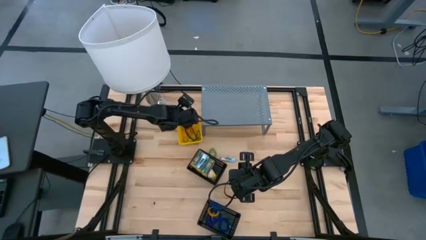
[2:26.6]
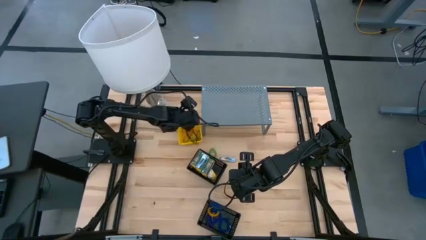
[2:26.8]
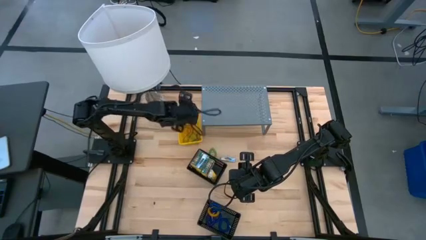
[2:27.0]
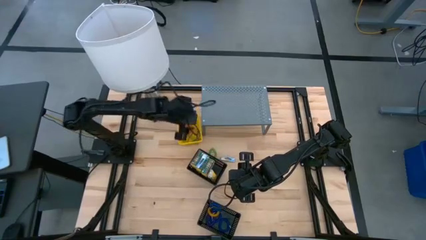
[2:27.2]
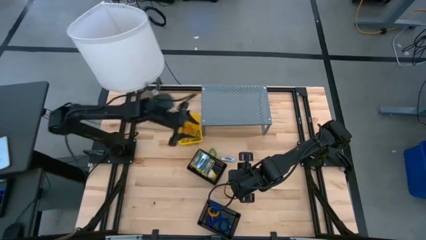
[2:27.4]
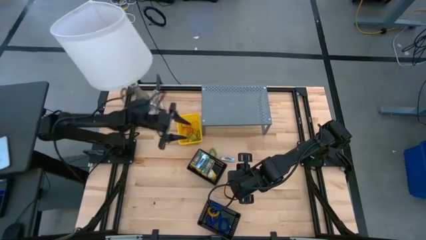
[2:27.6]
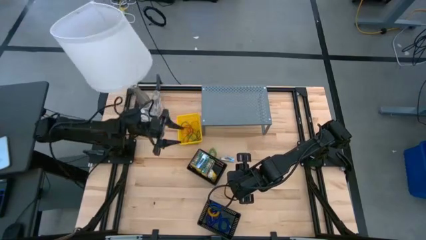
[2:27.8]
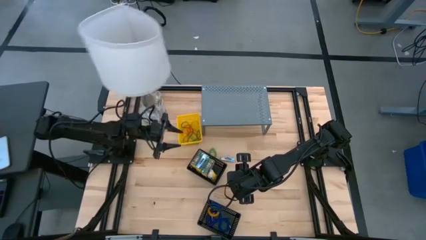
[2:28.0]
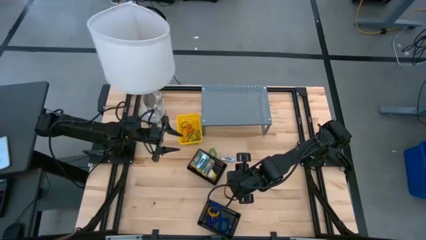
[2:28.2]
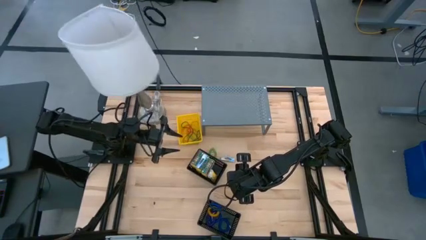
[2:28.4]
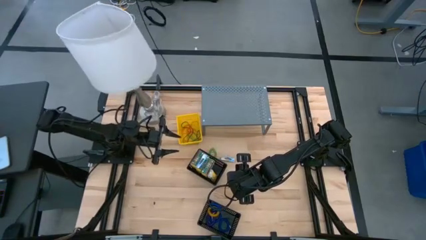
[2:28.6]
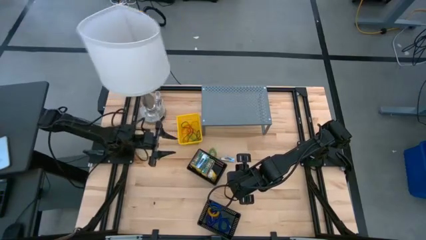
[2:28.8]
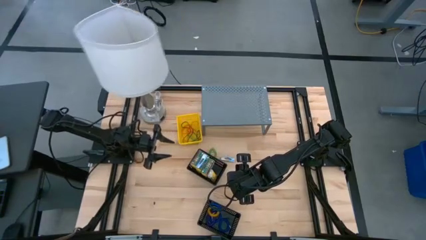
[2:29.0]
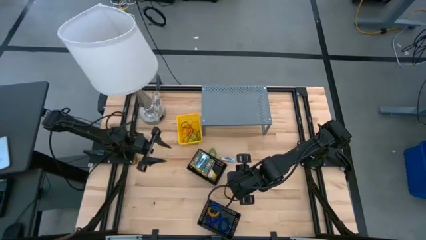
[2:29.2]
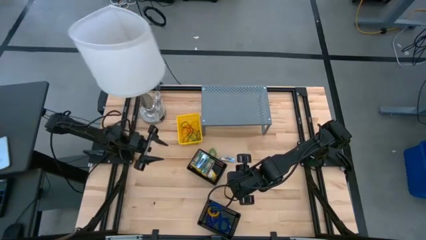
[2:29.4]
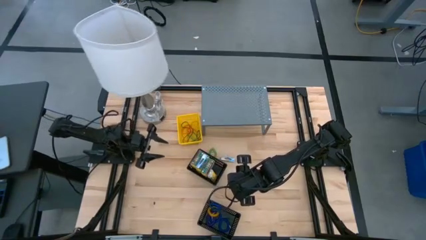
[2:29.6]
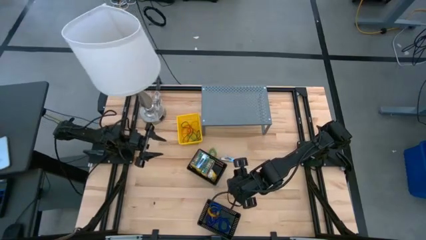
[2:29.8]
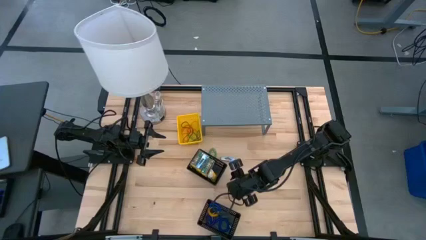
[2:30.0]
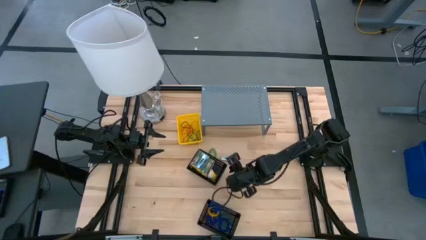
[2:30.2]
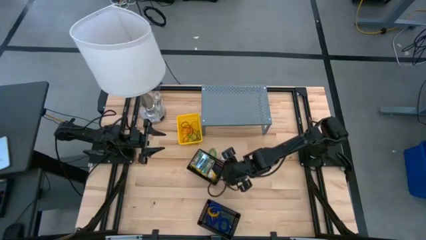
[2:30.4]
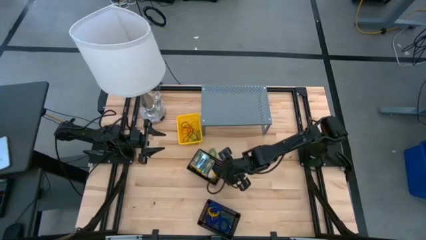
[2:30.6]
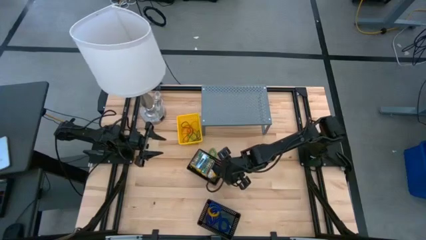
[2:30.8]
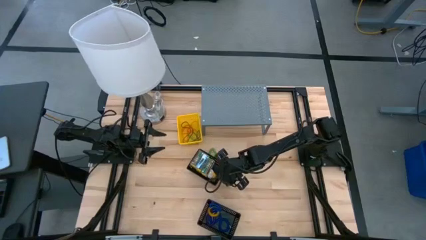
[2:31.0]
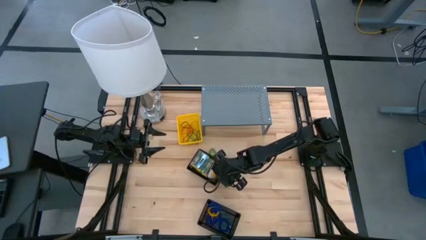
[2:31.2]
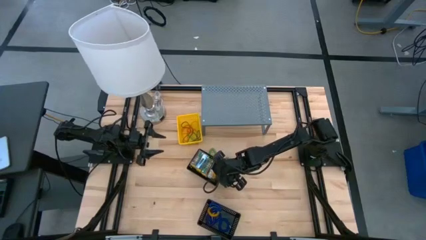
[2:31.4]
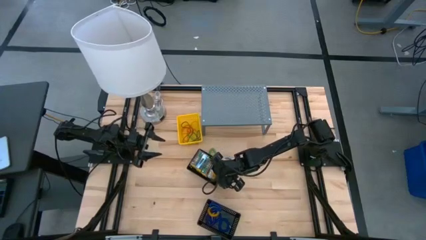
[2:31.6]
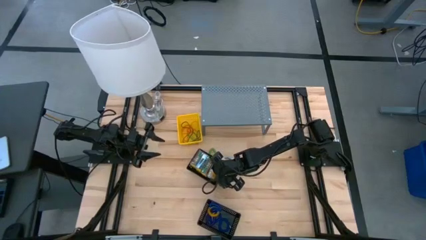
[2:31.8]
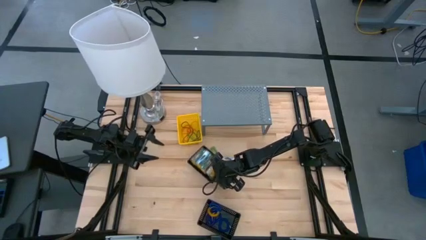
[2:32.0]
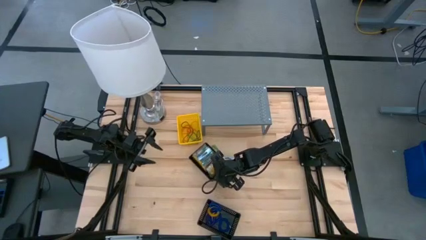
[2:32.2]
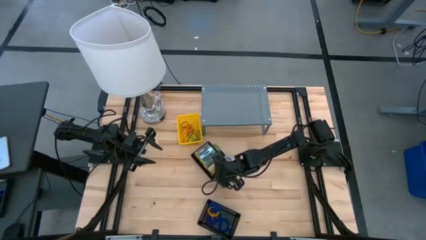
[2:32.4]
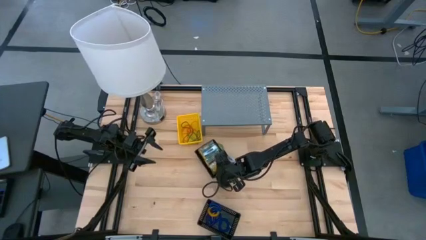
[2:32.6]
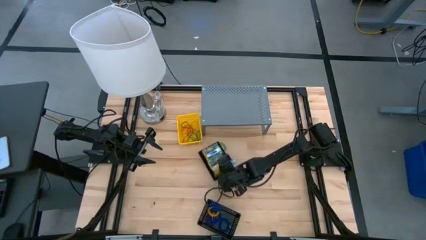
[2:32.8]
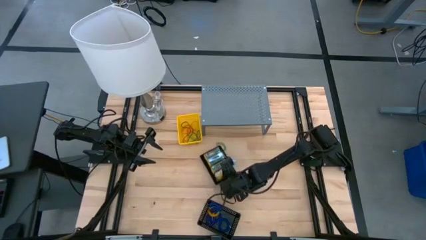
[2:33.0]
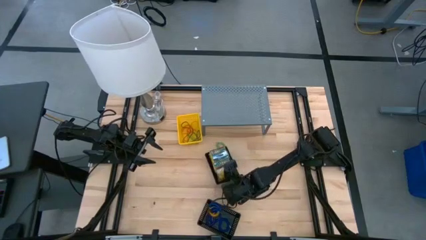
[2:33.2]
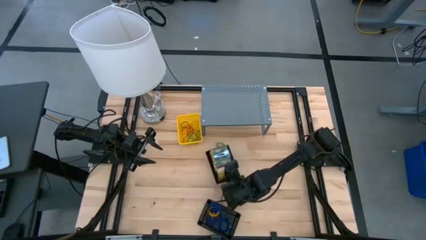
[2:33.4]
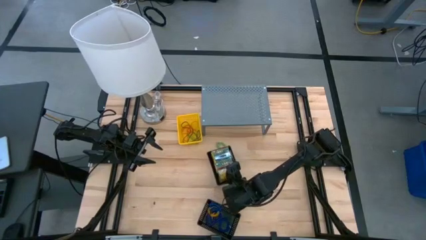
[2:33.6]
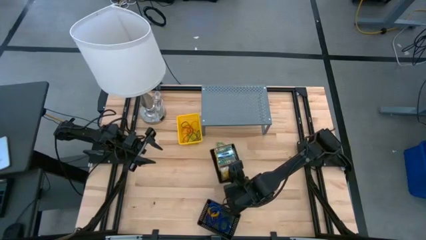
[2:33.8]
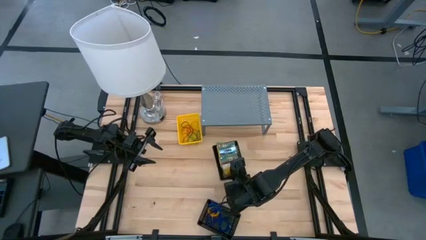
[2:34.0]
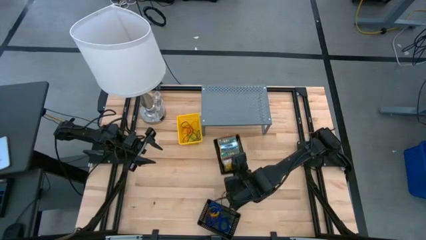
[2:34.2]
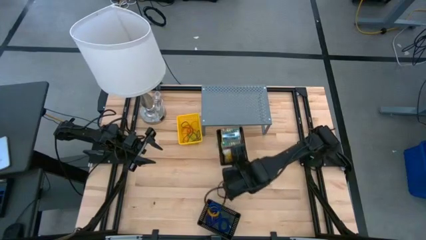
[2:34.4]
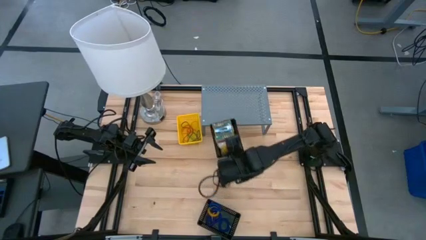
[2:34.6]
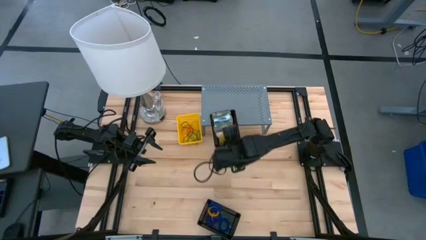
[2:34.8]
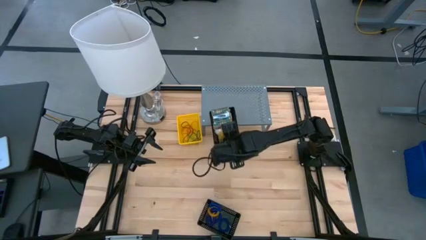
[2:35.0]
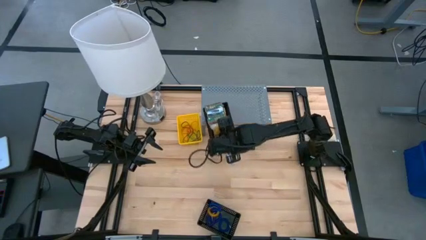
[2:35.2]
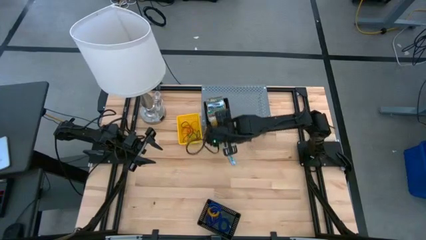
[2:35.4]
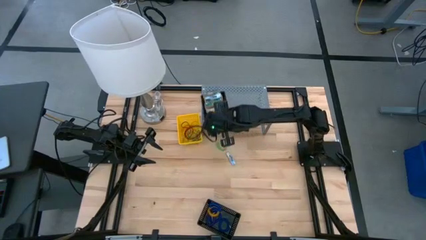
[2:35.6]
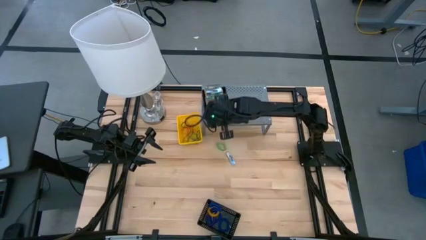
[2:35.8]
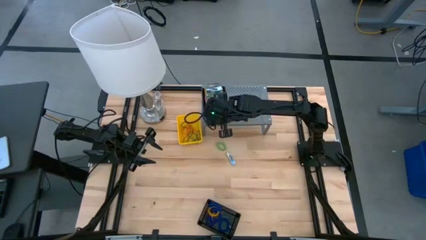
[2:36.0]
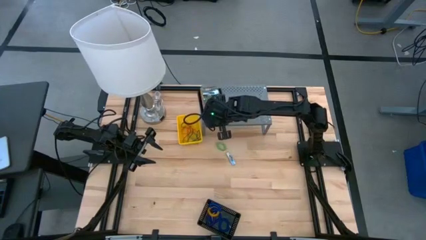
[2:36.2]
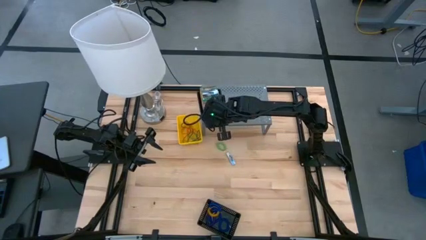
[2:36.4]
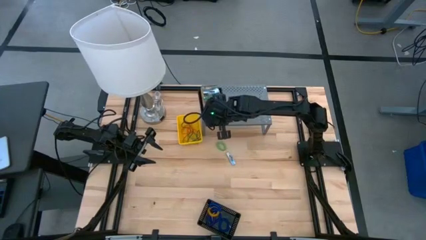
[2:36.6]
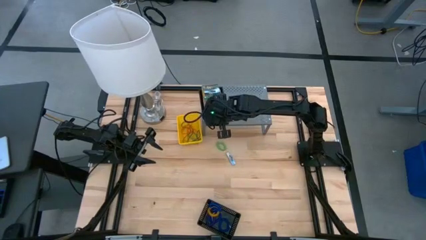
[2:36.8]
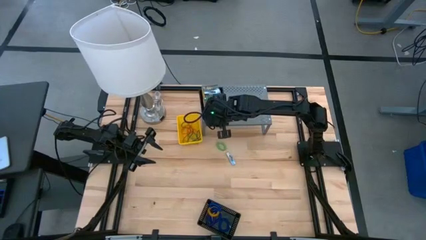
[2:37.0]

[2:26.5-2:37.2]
Task: Pick & Place Office Desk Supplies
Put the top black bin on the shelf

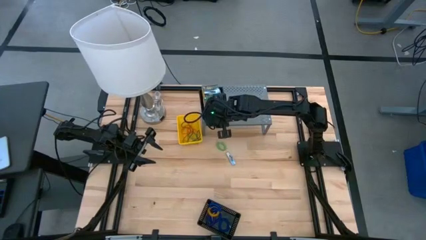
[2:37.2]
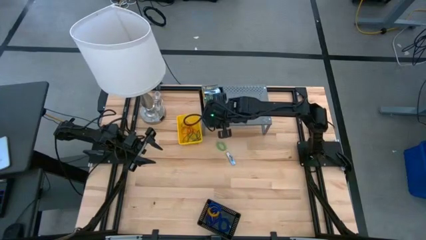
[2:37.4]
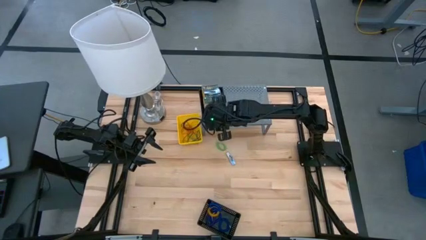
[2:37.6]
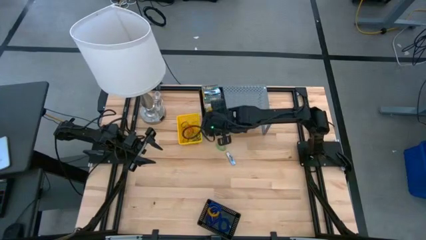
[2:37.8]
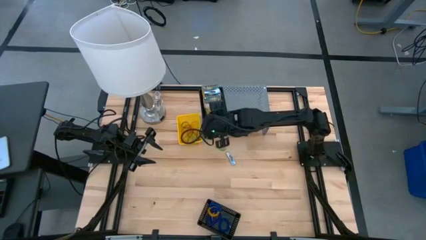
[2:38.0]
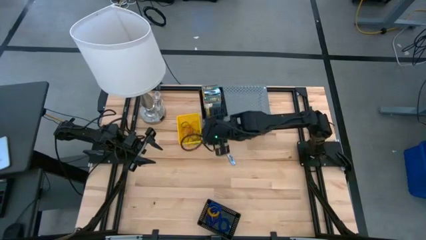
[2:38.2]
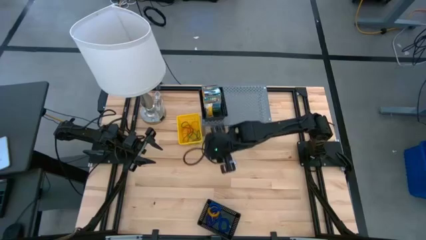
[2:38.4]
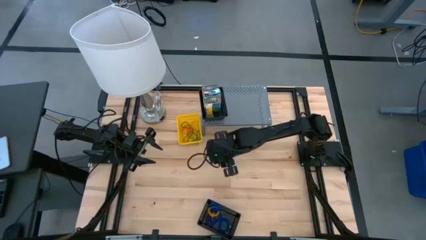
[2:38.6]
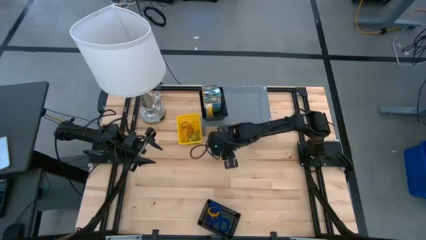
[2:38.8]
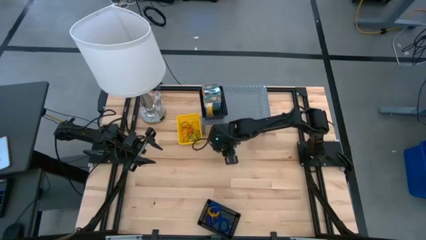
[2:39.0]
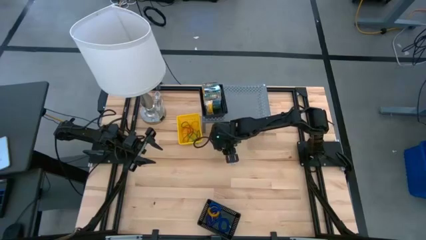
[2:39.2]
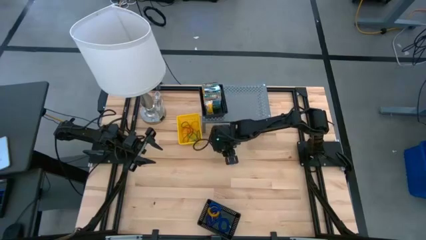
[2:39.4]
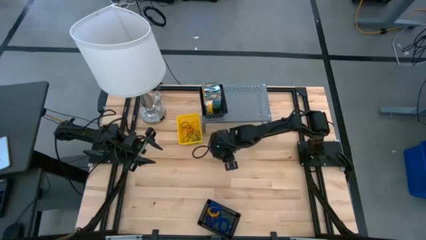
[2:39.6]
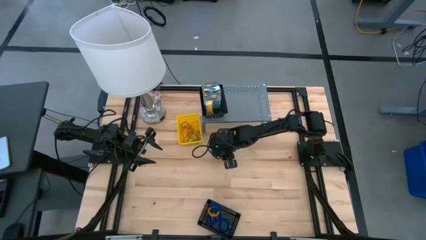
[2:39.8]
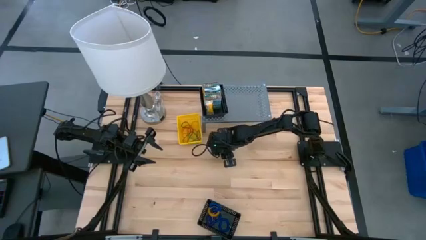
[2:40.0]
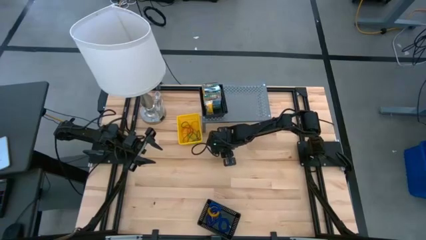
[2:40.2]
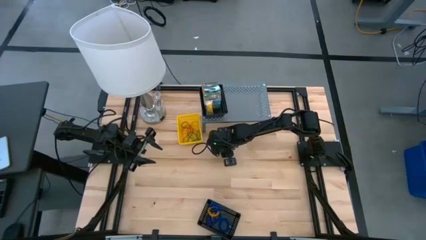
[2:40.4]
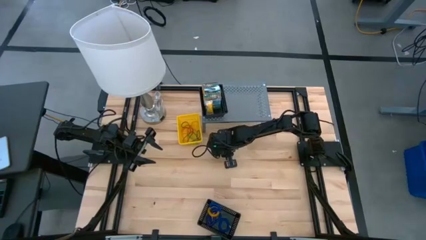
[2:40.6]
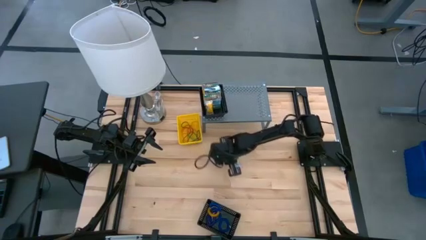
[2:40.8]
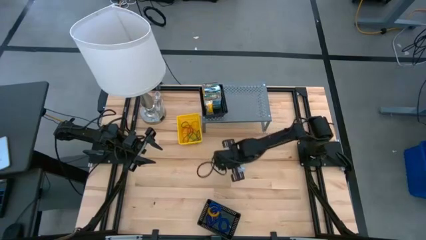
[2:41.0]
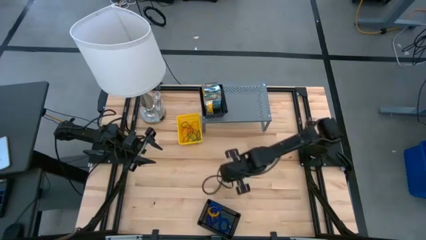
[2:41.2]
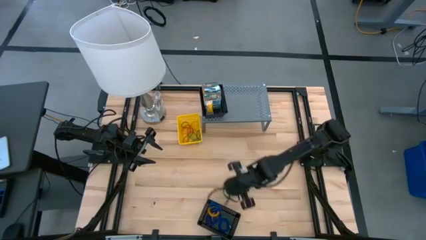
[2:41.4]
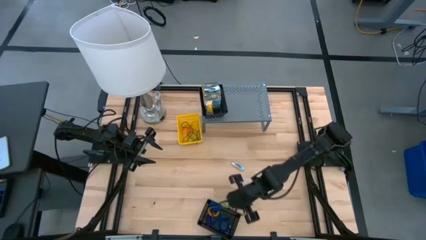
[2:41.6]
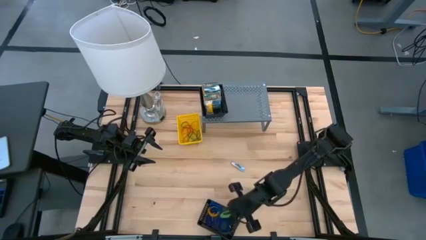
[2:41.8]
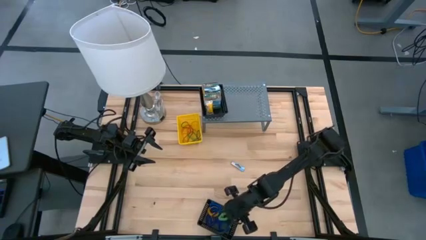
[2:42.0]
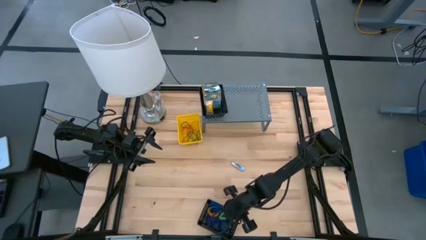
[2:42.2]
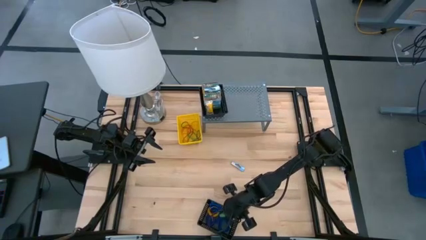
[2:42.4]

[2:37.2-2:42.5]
Put the green spring keychain into the black bin on the table

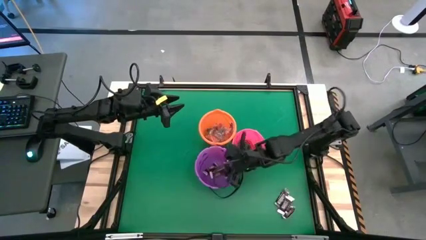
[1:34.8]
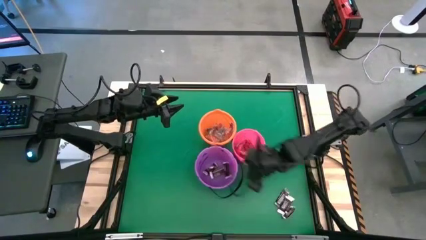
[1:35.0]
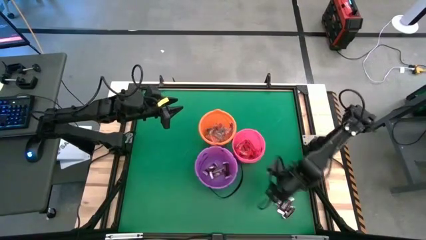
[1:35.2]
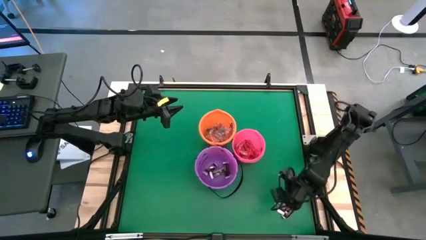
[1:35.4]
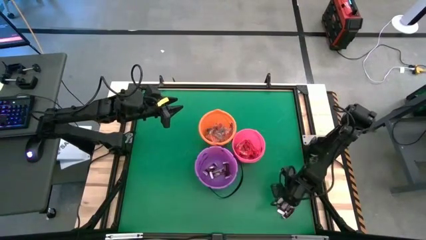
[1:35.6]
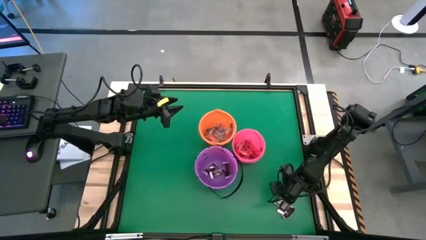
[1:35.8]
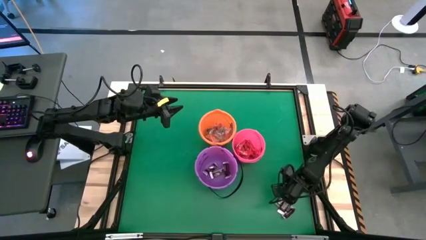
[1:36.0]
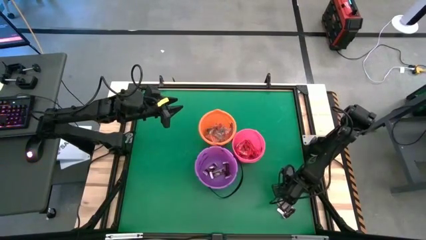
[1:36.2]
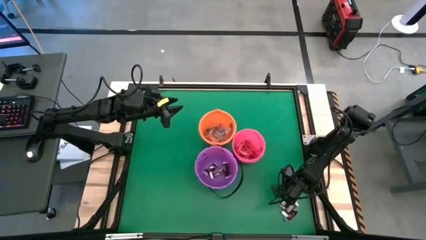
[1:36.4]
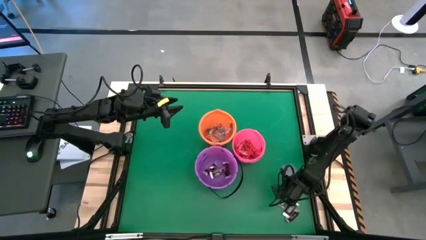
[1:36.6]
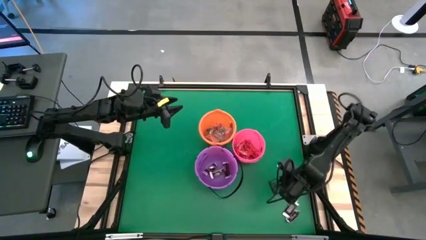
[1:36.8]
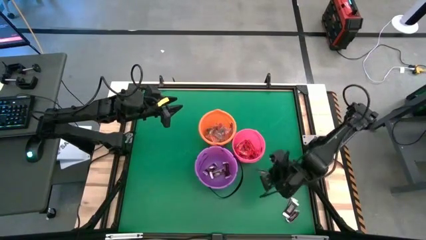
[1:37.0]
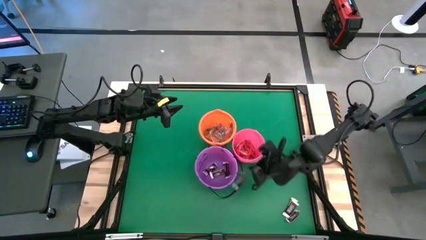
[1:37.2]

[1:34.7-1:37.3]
Task: Sort candy by brand, put in halloween buckets
Put the brown chocolate bar into the purple bucket
